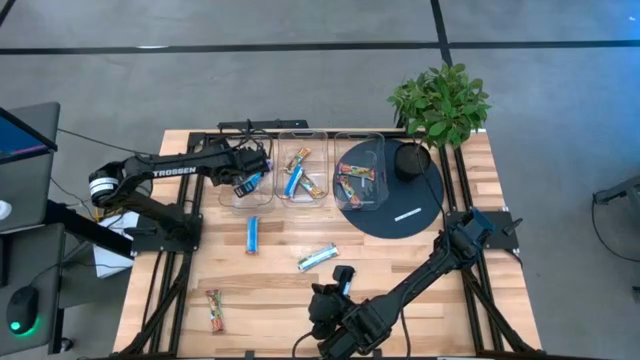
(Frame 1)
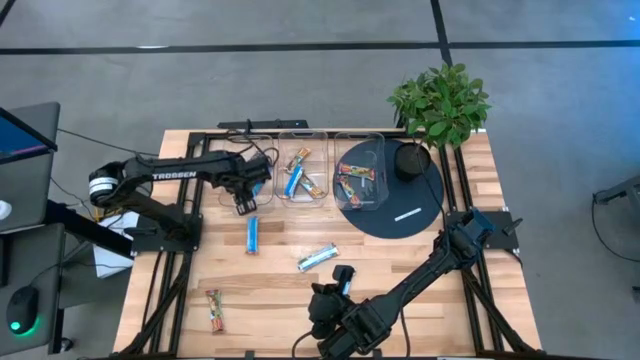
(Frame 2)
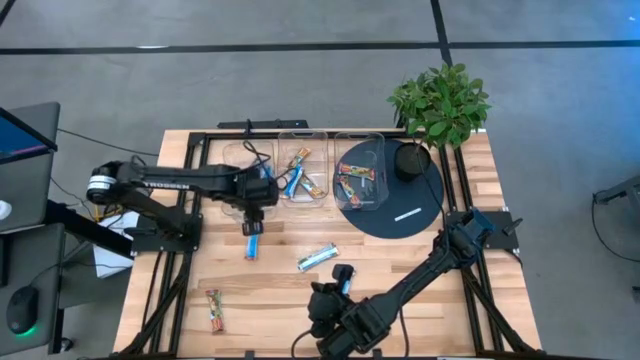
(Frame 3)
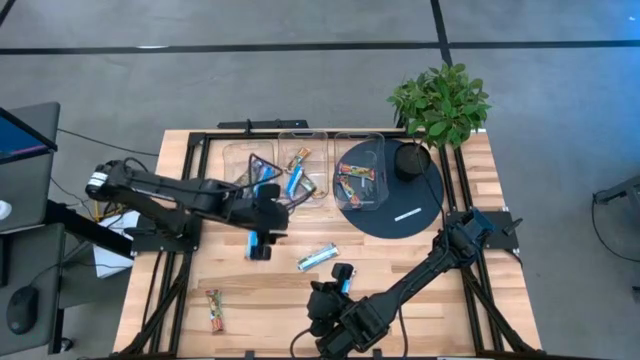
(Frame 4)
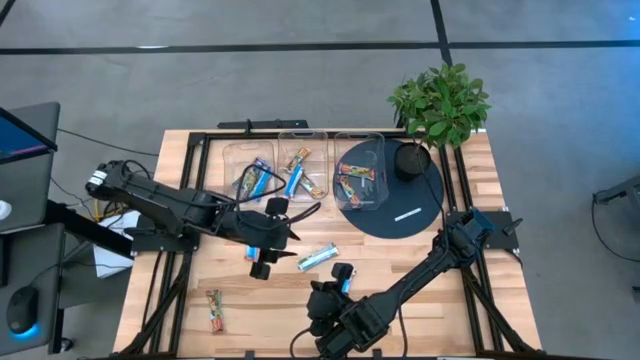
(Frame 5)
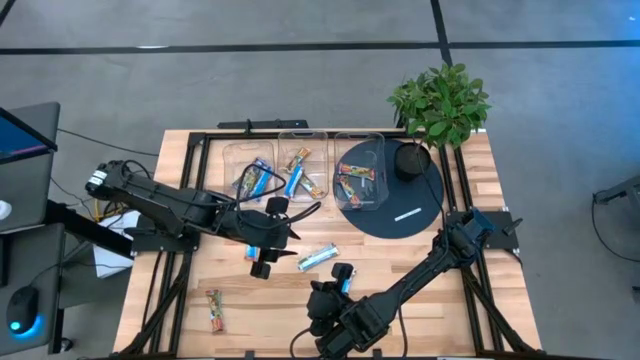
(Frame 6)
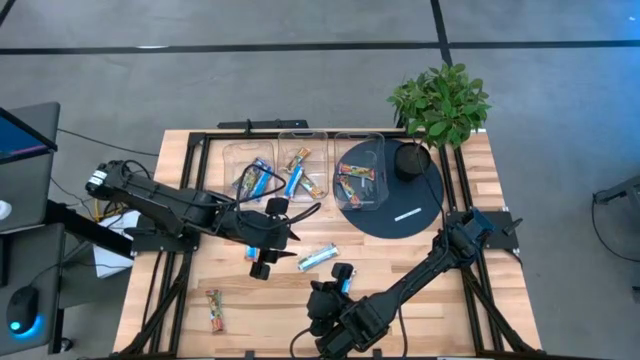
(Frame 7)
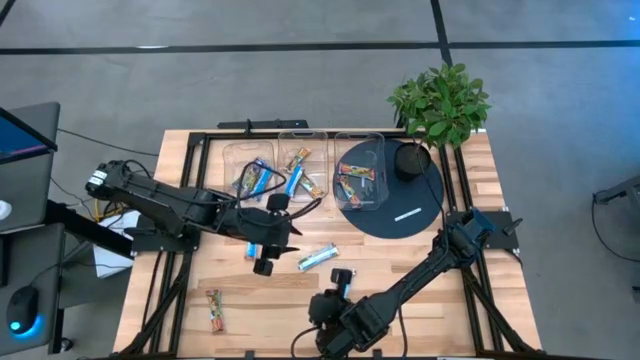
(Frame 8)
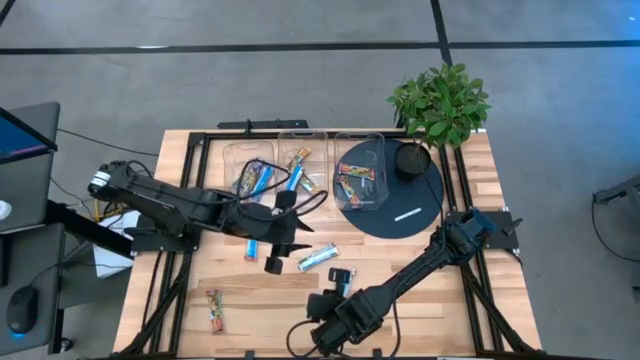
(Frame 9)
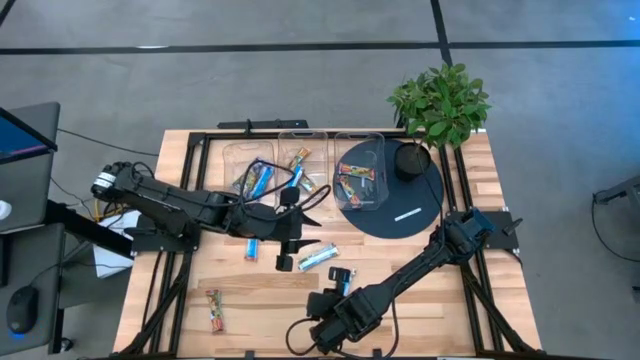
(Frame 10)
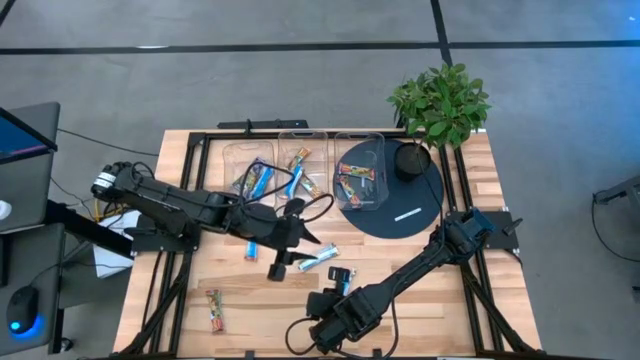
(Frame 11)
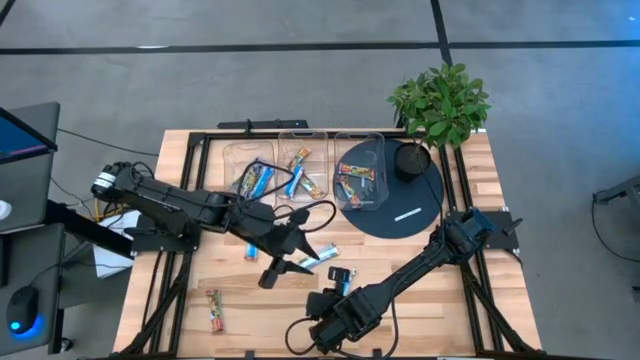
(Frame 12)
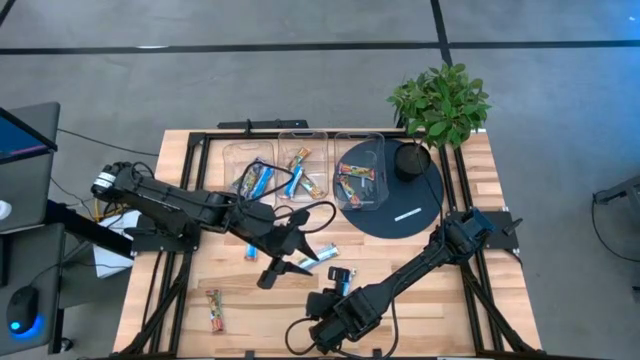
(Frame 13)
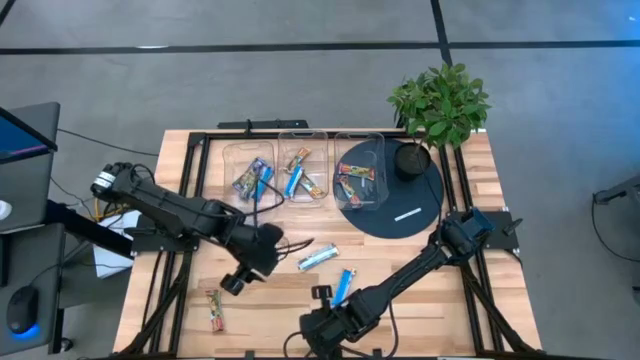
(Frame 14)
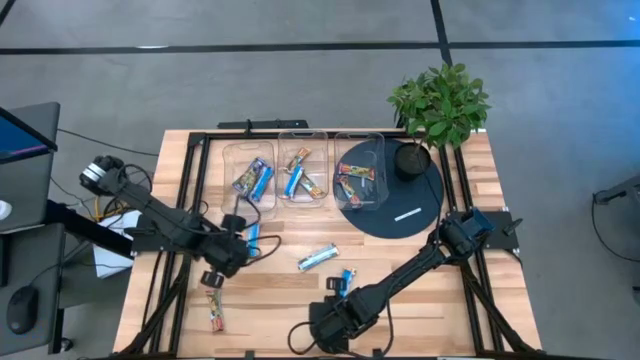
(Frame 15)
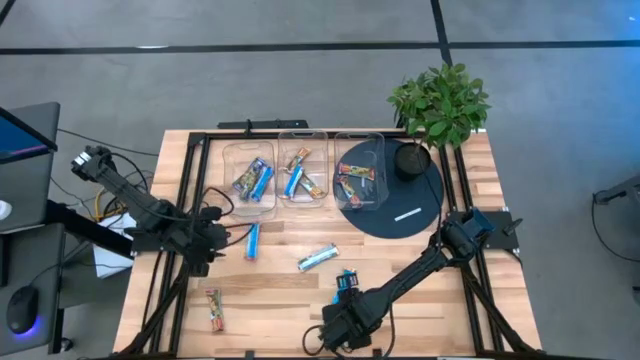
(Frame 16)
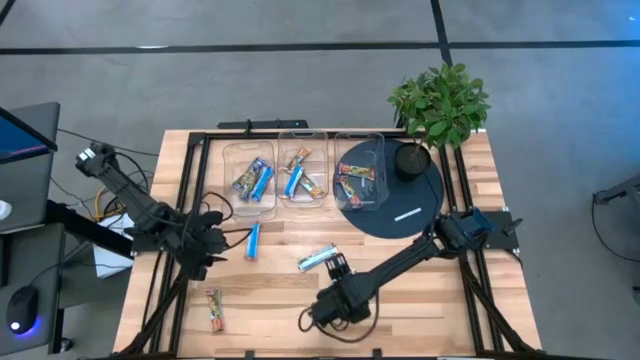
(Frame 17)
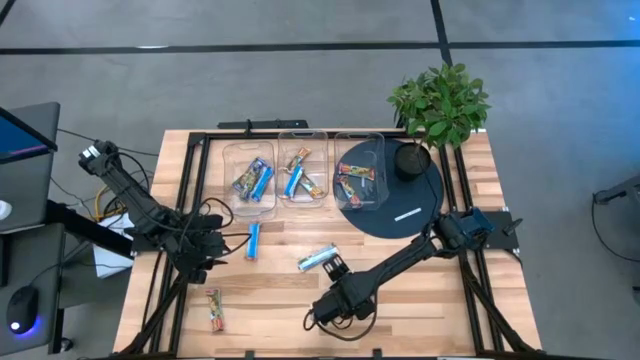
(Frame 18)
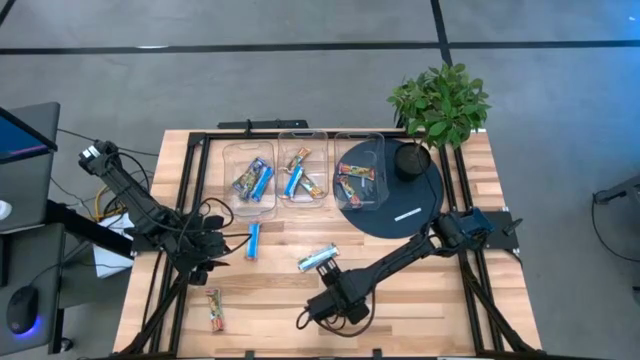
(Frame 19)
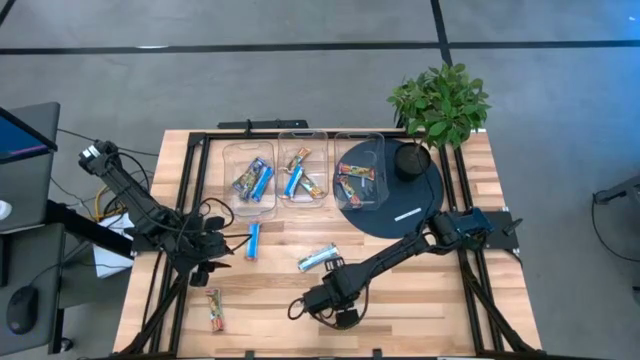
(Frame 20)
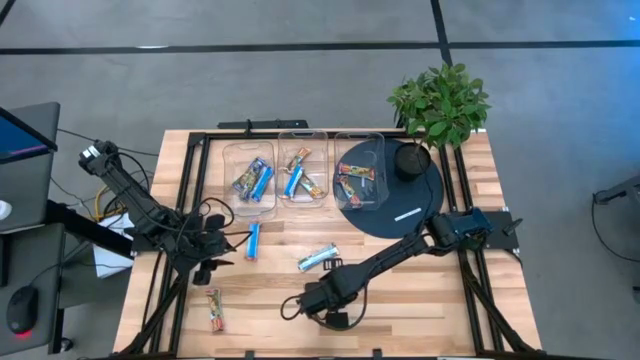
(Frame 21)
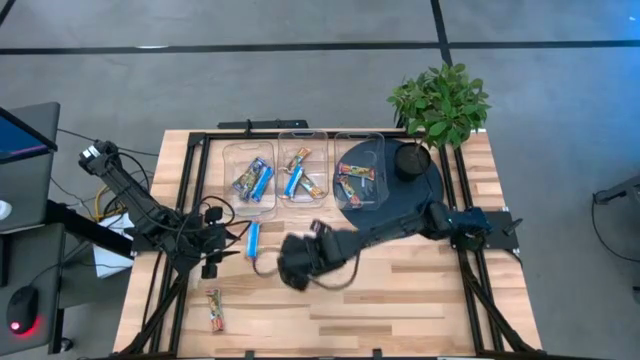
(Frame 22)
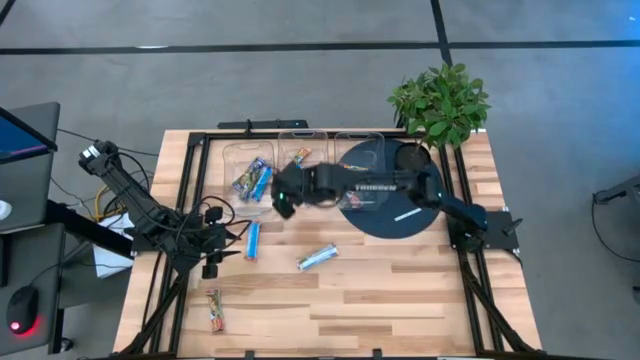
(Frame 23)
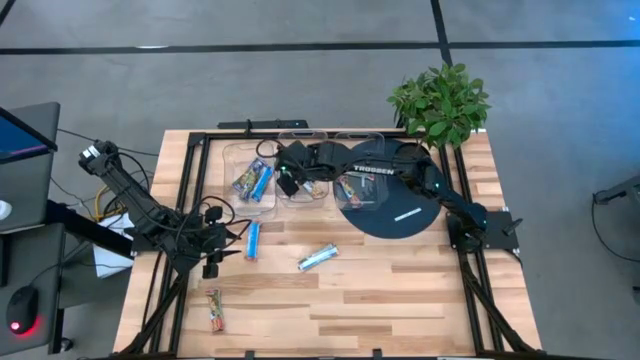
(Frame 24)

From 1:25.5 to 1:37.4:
Task: Pick and place Granola Bars by type
Put the orange granola bar into the middle transparent bin

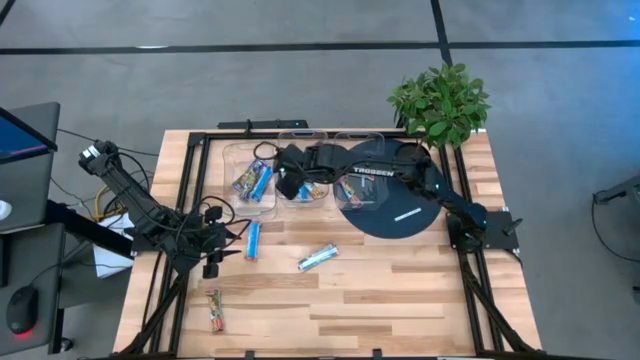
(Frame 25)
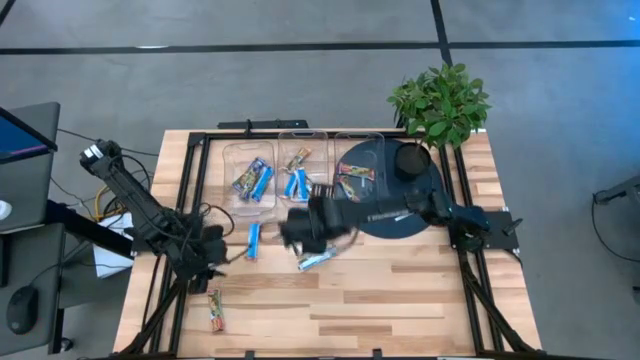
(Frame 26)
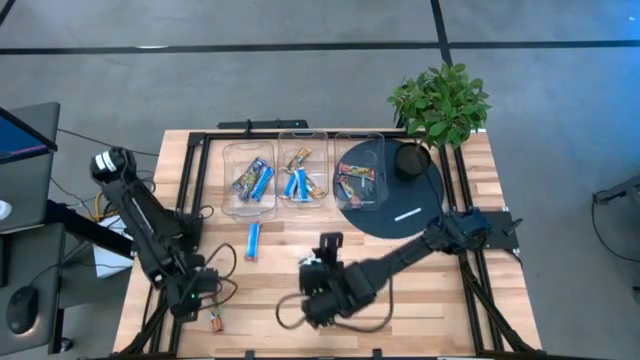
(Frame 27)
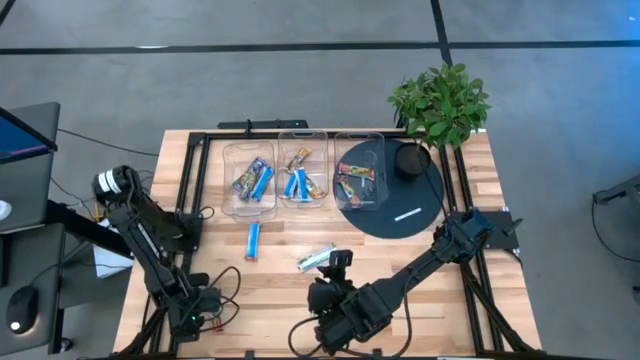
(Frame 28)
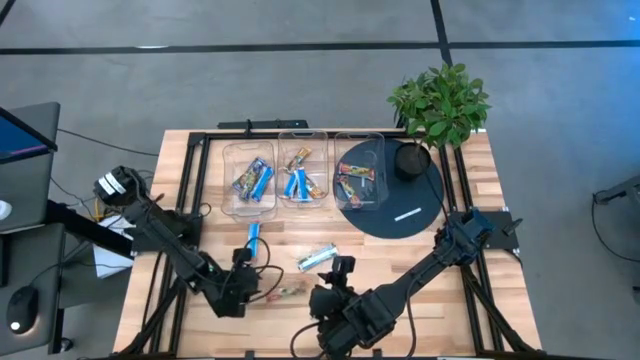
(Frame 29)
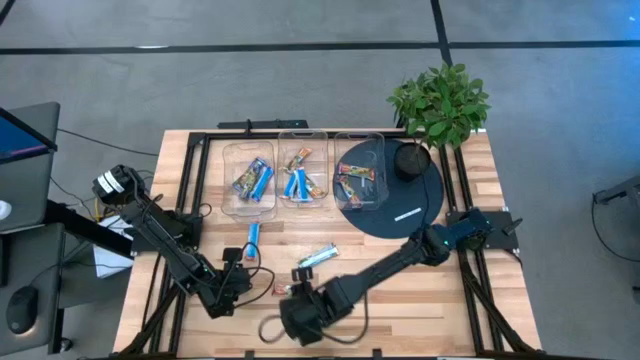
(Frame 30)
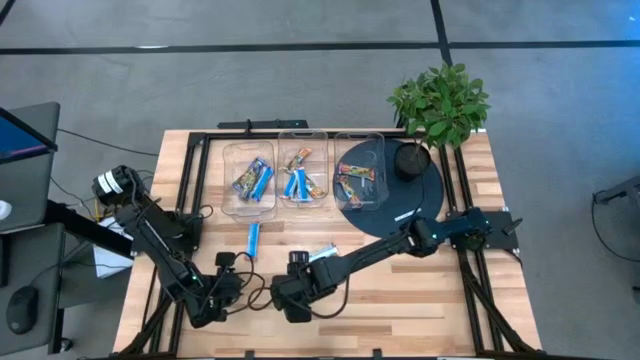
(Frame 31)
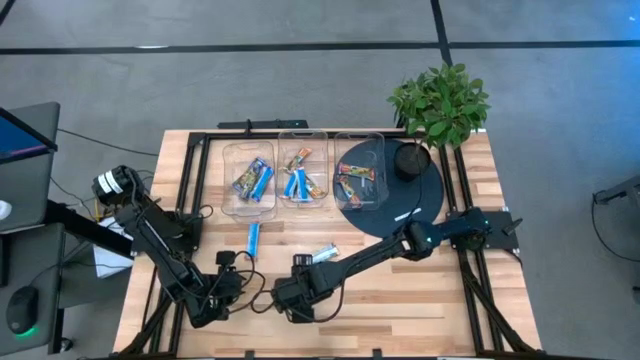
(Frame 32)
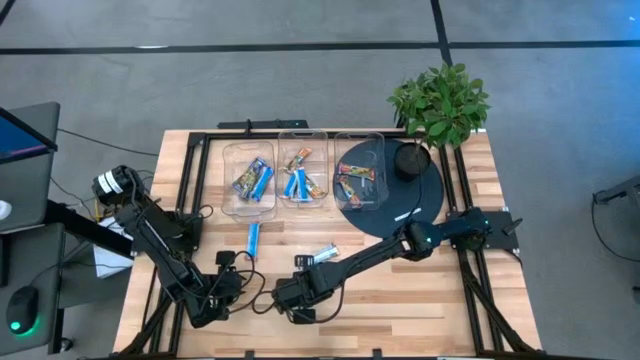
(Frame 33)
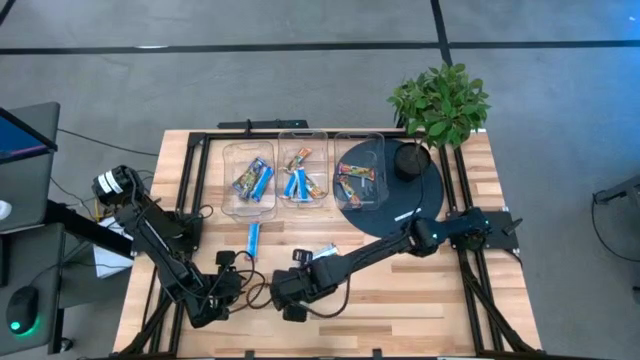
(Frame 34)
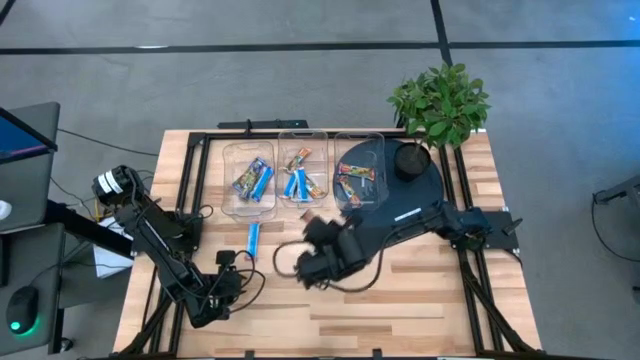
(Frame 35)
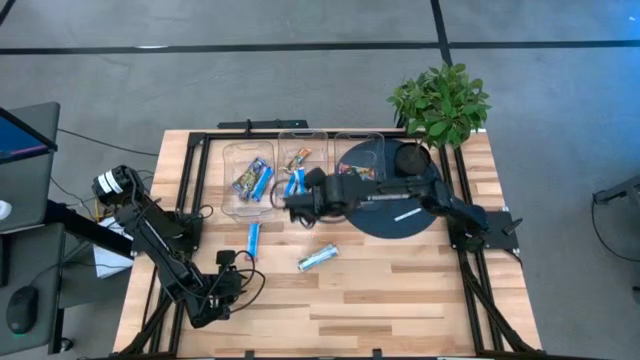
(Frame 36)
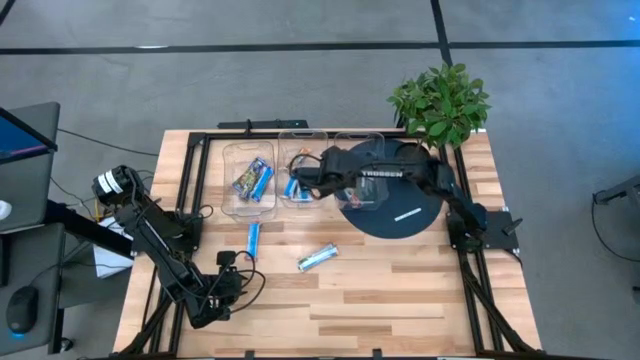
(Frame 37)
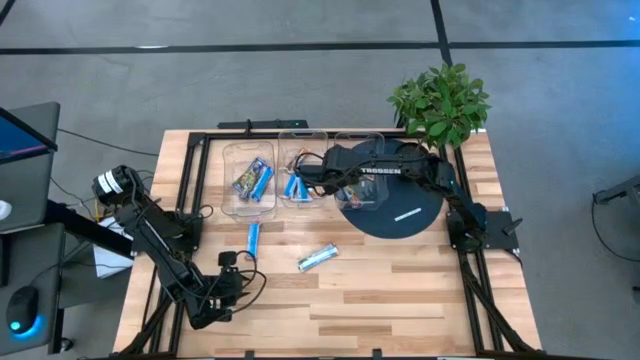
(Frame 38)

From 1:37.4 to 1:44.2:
Put the red granola bar into the right transparent bin

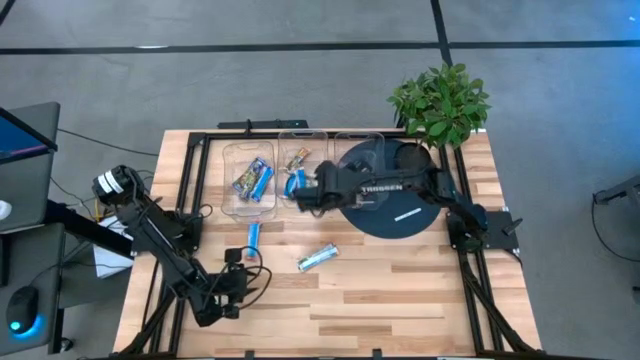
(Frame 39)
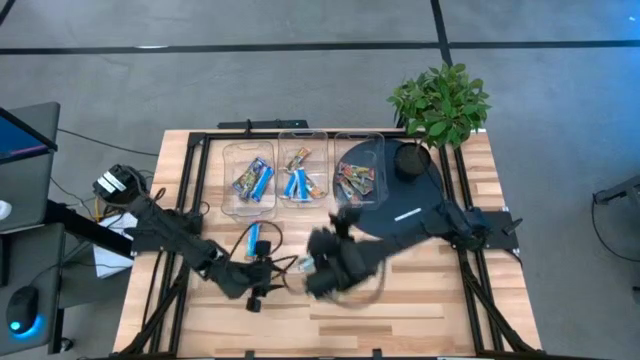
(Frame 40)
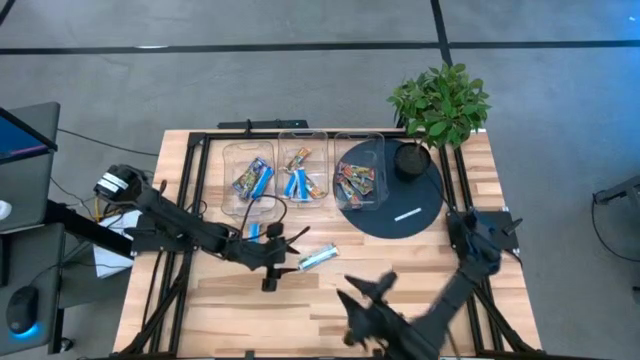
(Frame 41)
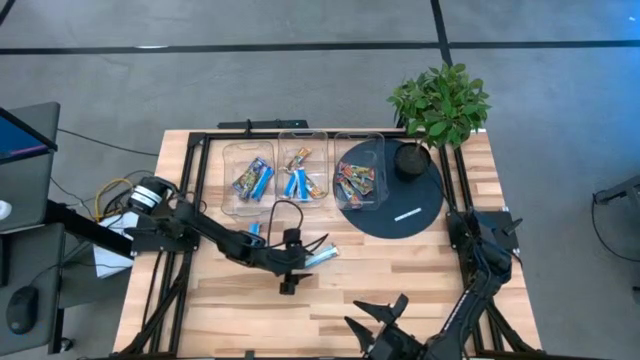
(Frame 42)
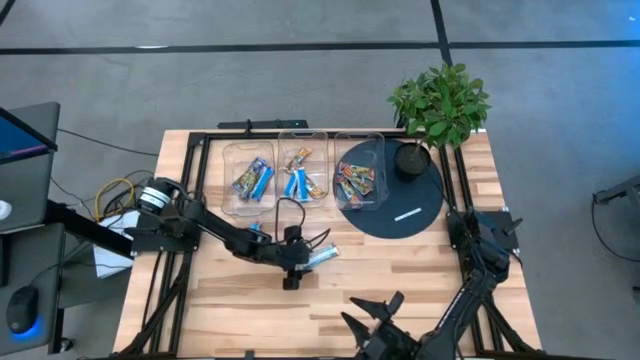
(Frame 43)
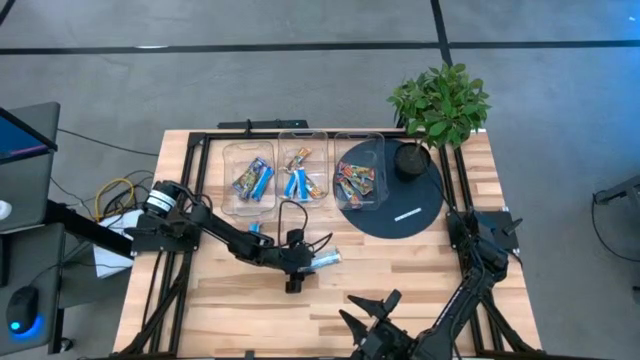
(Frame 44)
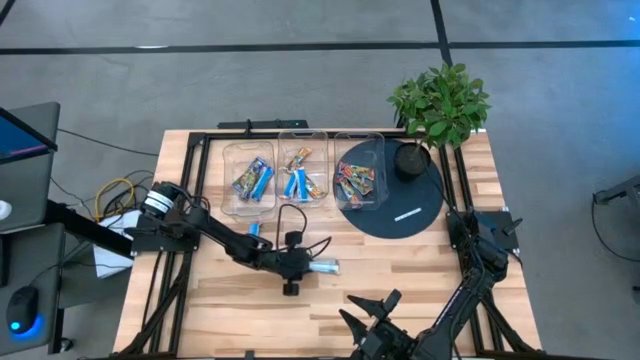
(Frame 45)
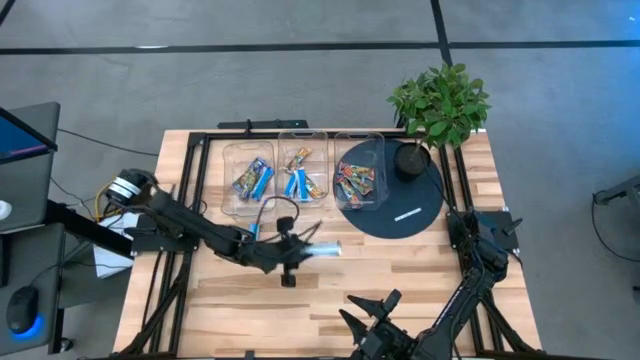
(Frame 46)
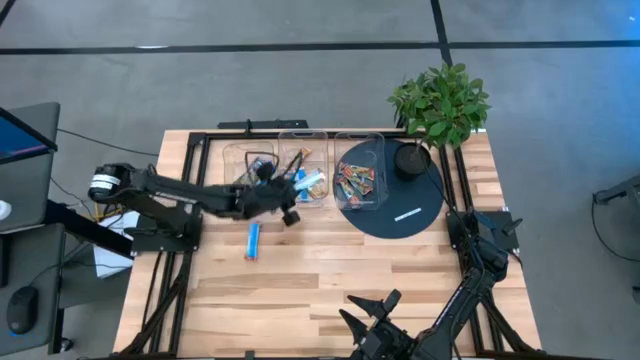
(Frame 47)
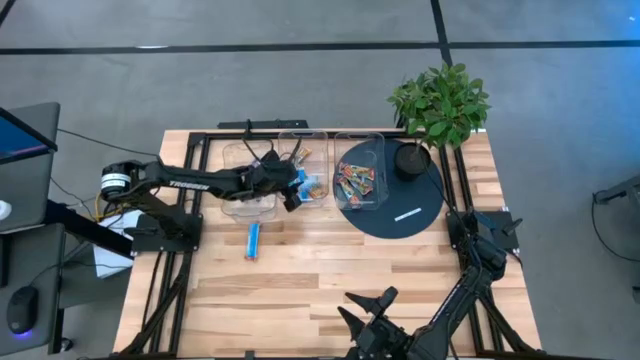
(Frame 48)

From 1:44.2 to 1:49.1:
Put the orange granola bar into the middle transparent bin
